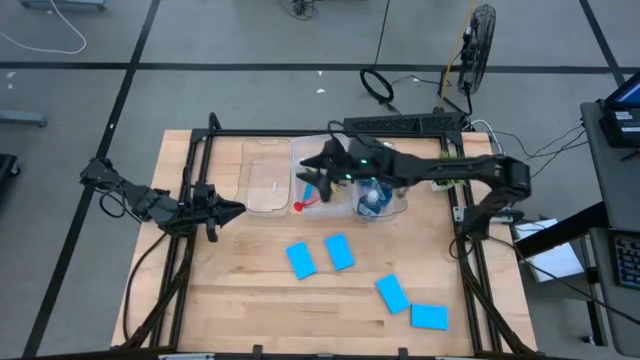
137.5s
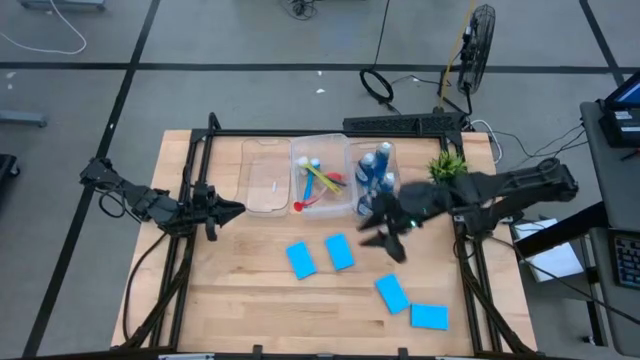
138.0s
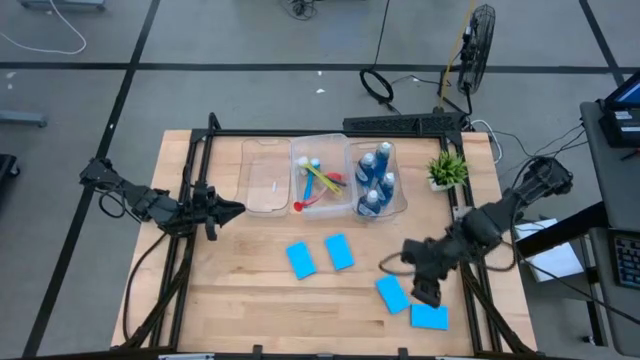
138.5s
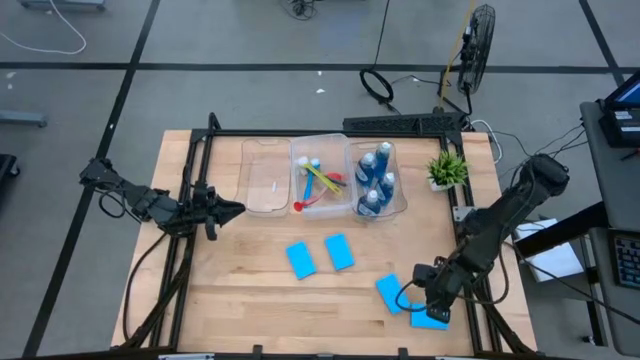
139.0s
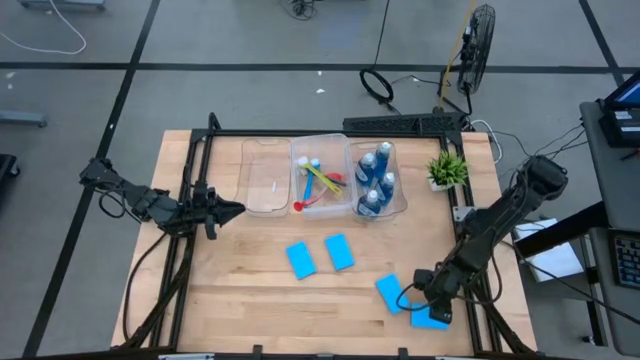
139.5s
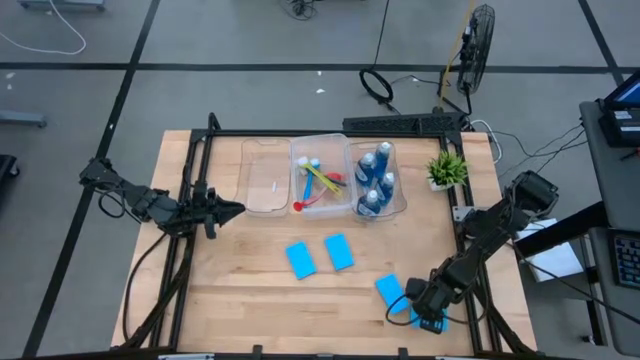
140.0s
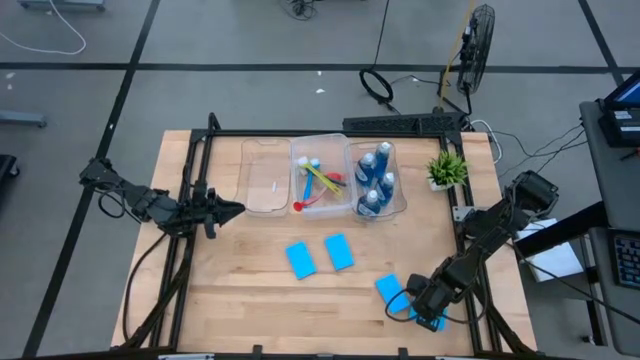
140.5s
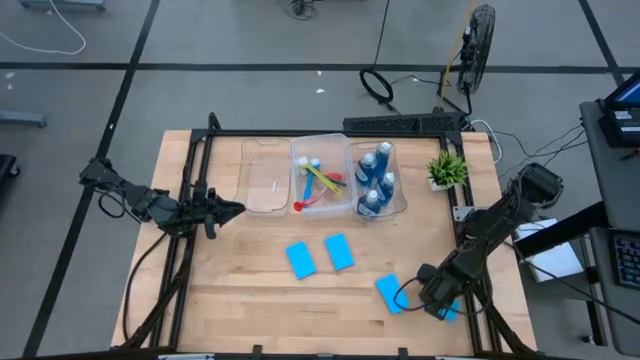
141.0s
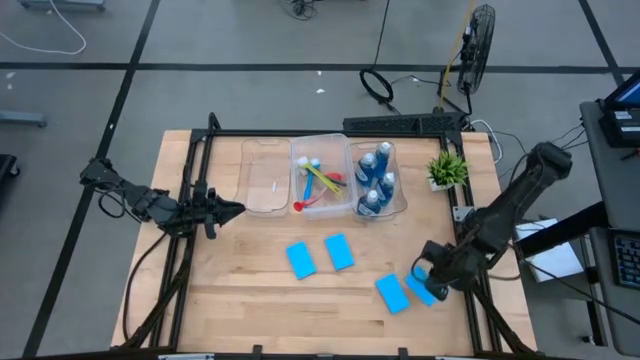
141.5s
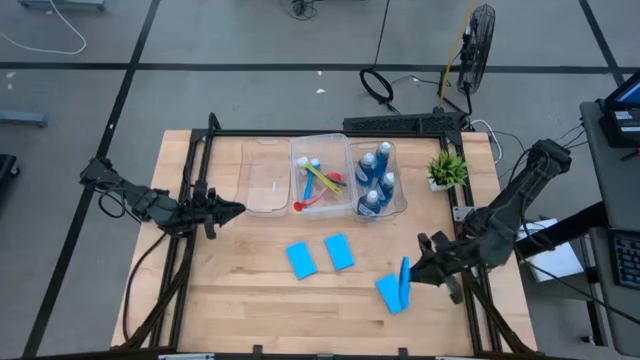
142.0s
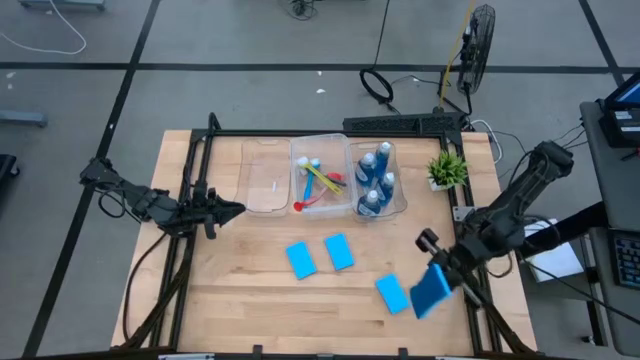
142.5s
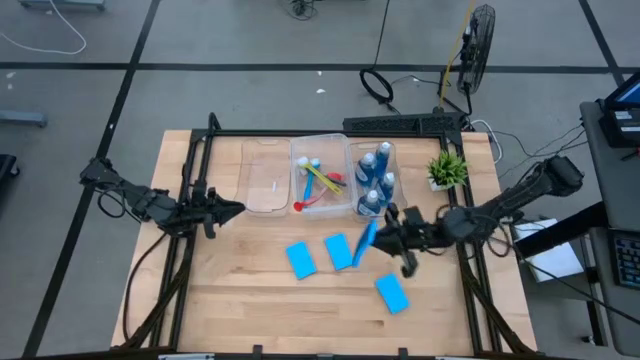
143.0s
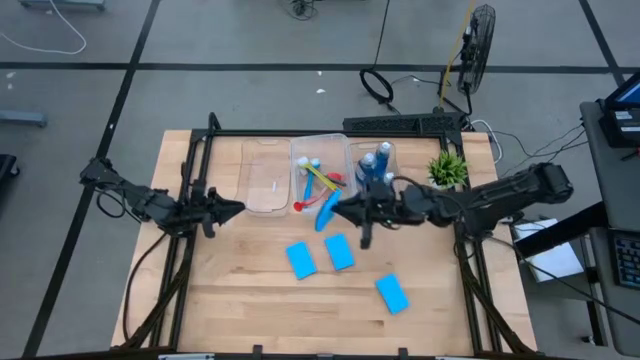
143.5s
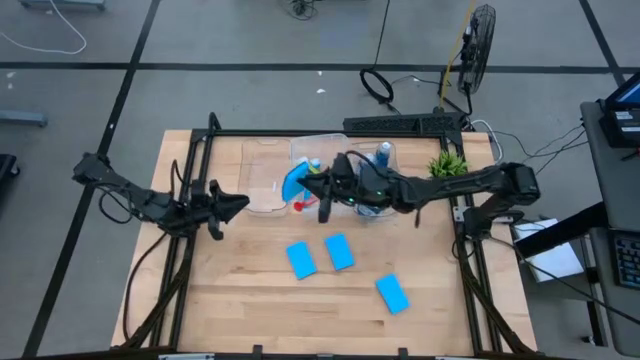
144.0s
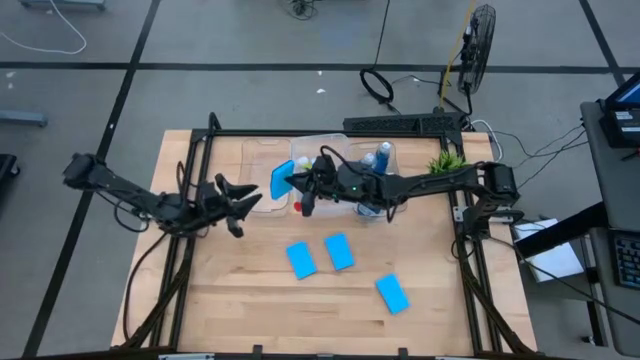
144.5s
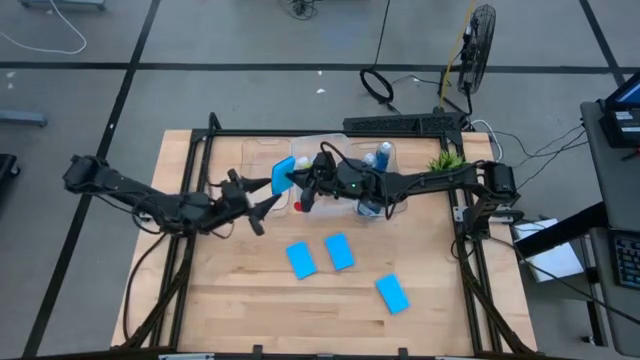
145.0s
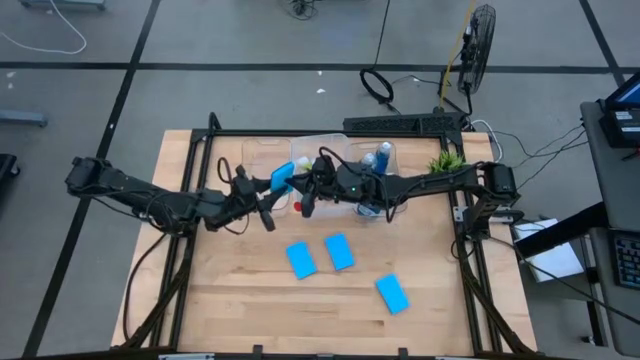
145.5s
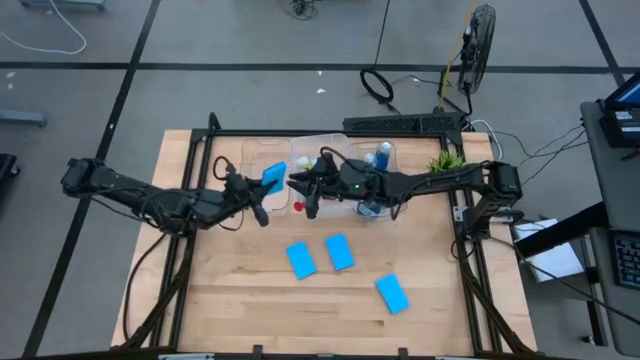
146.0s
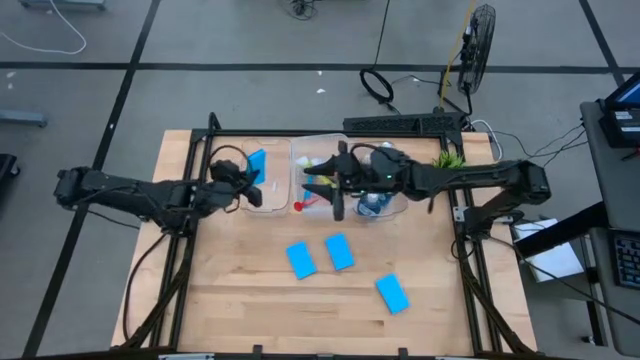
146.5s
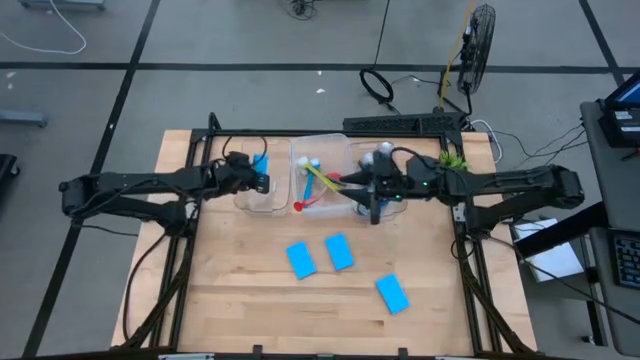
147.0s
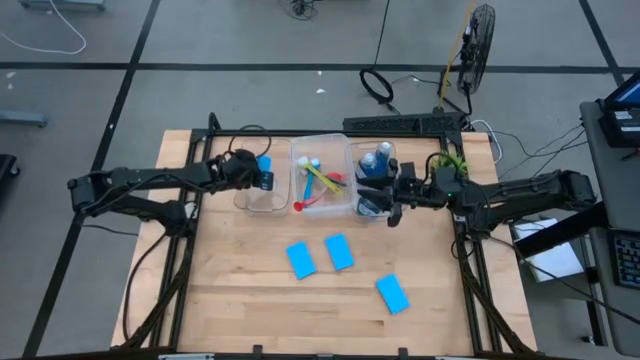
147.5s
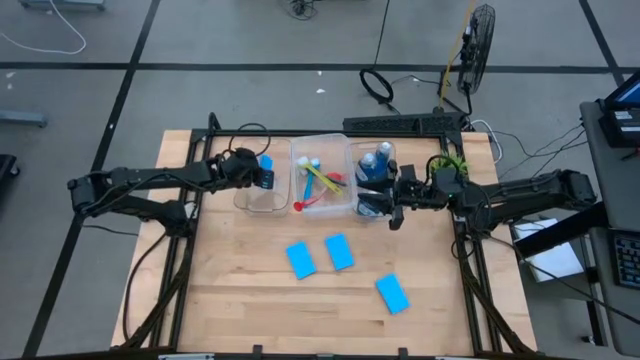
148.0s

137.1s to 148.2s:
Task: Pick & Place Kitchen Sink Supplies
Put the blue dishwashing sponge into the left transparent bin

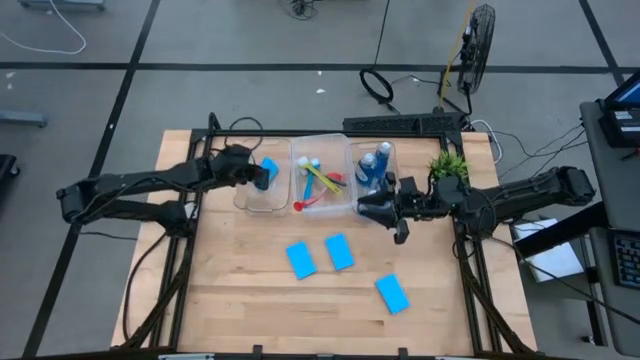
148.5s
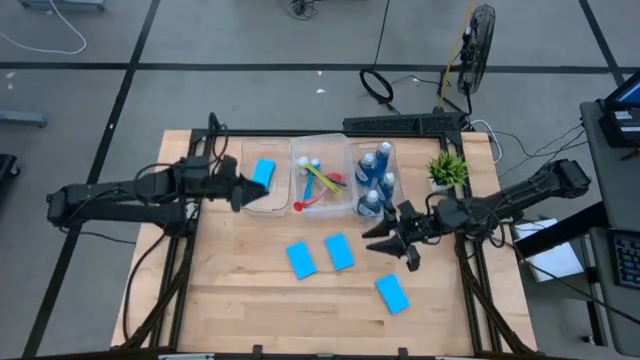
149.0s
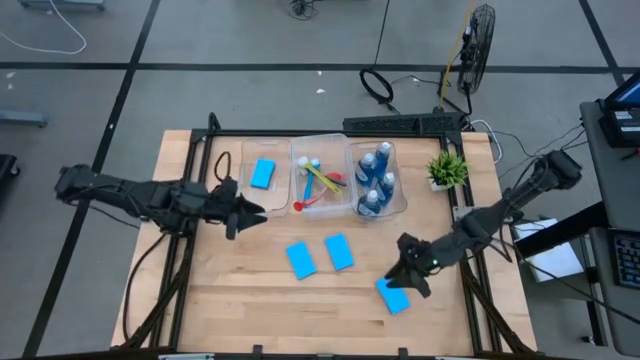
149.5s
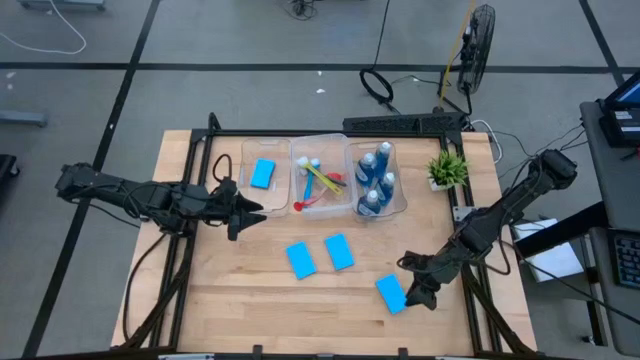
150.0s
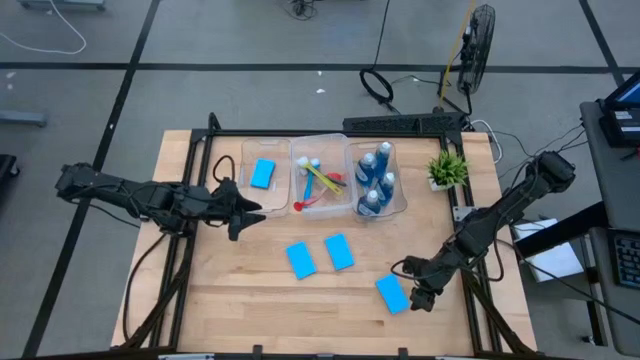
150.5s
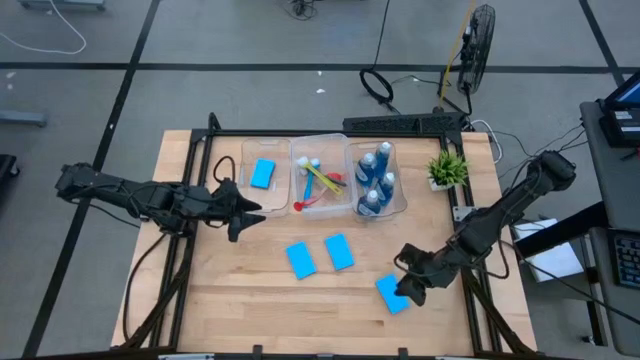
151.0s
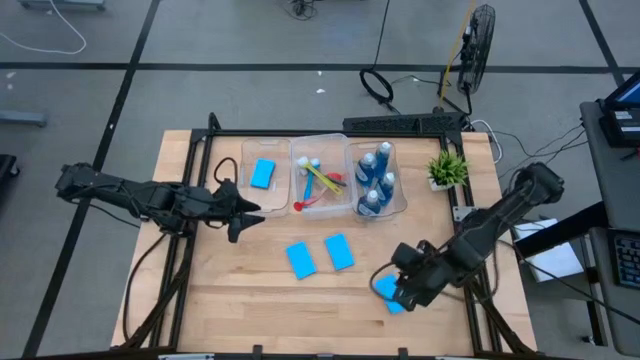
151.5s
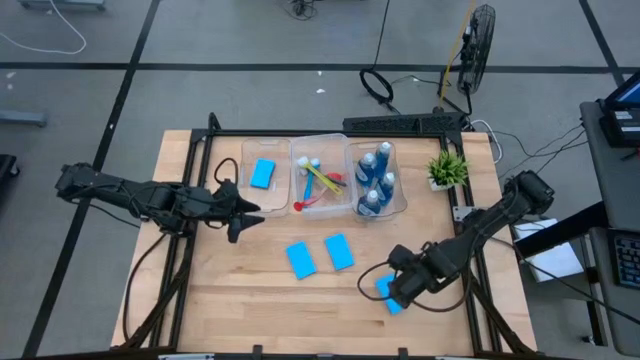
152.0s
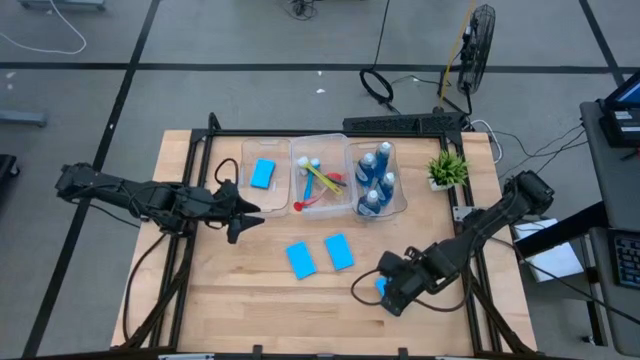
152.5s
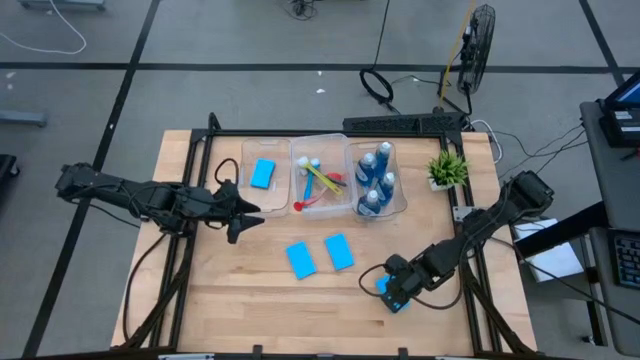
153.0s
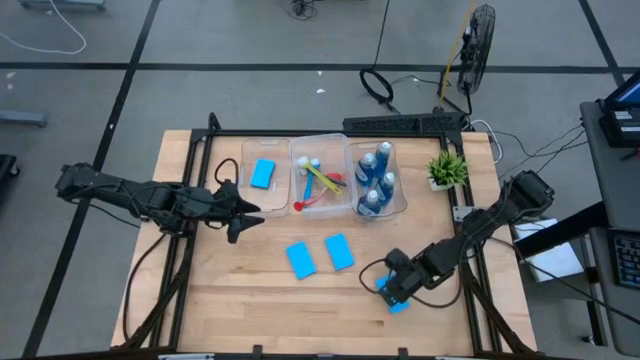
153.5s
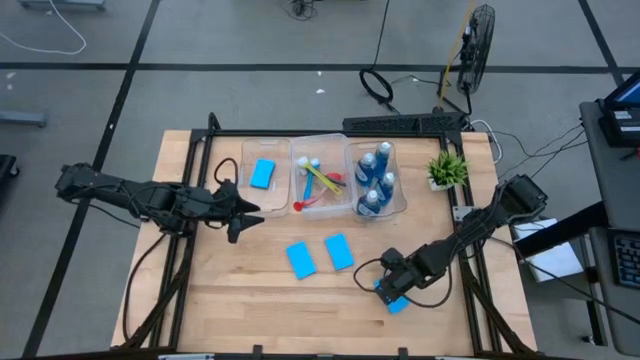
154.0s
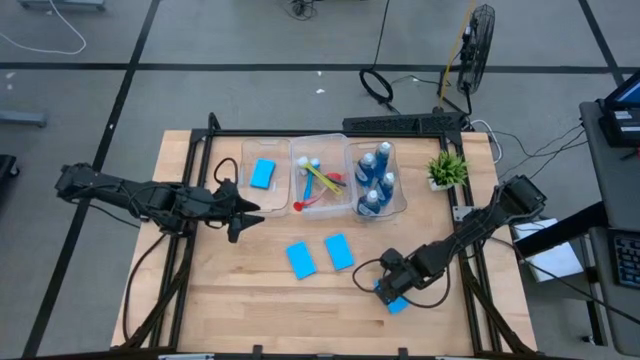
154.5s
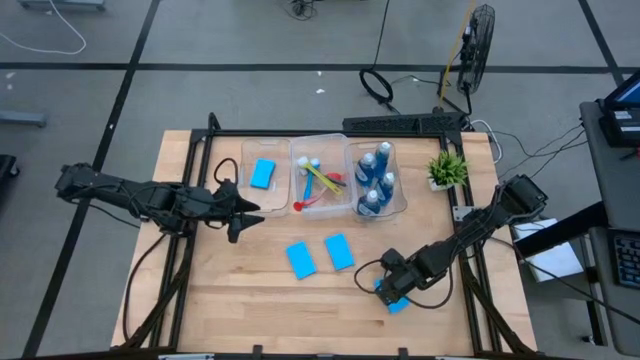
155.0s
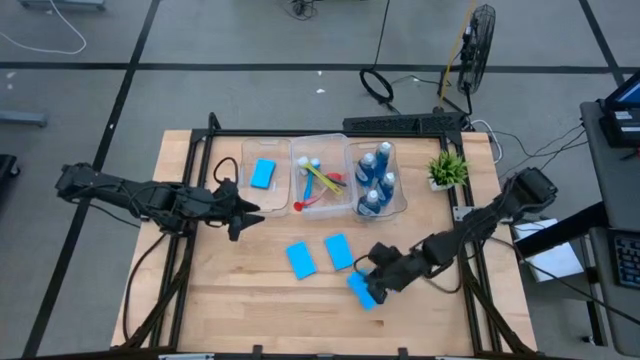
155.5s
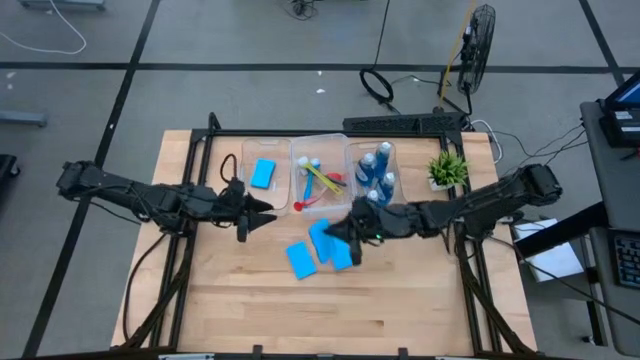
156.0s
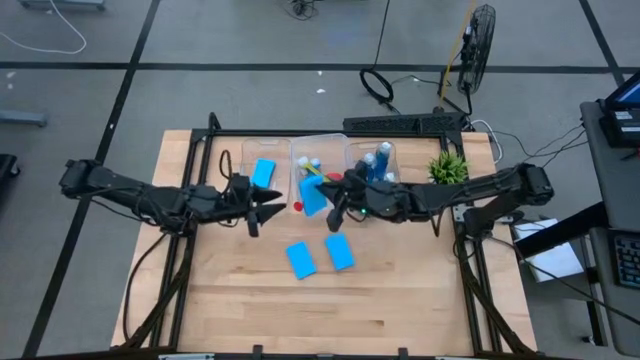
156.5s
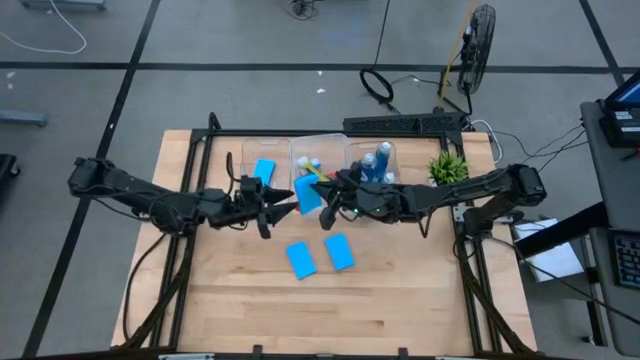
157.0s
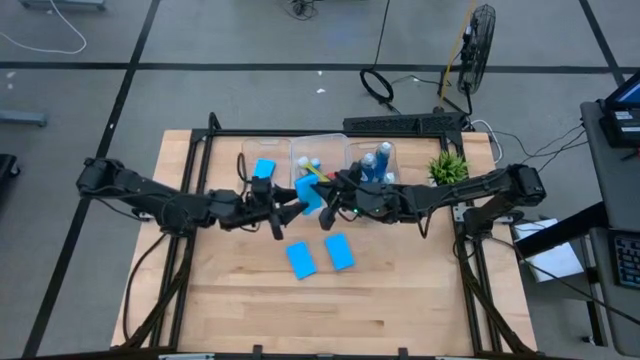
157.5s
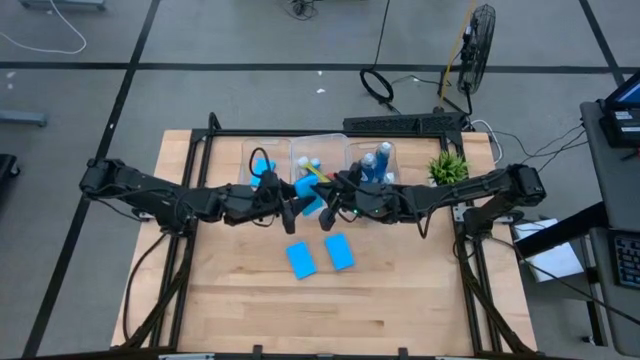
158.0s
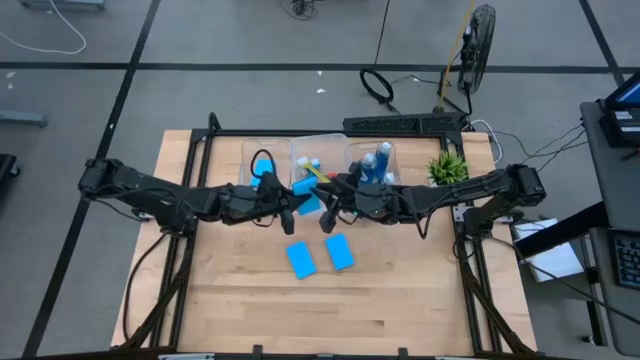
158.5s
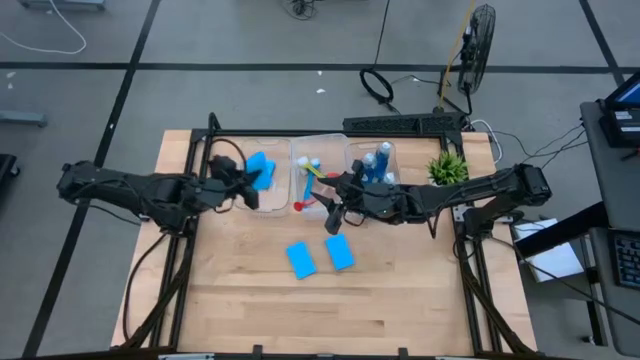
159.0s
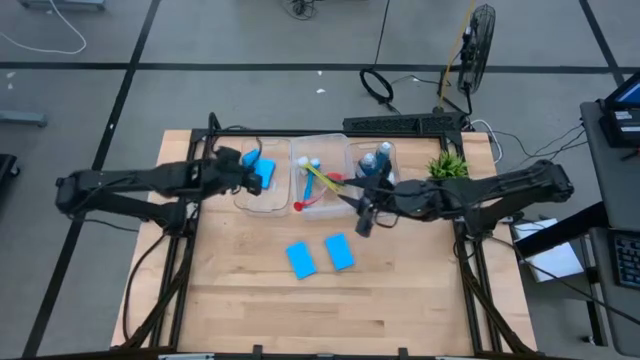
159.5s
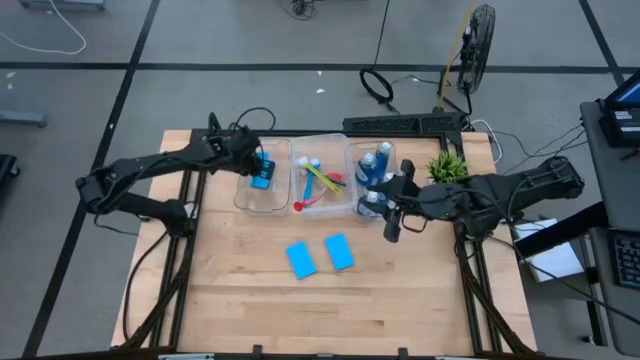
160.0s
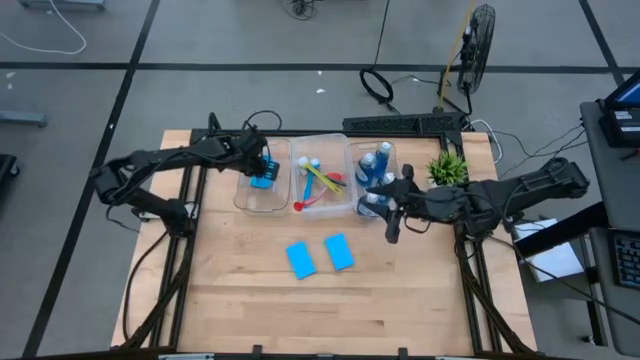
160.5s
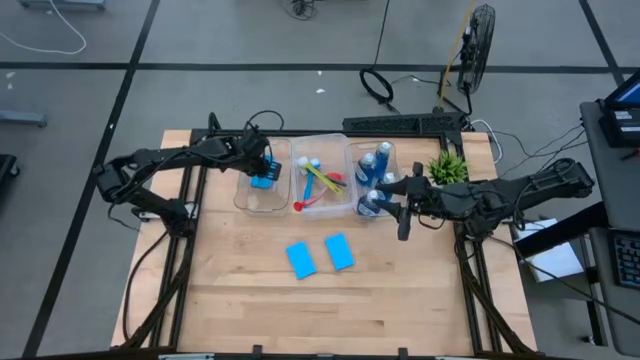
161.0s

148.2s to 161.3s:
Put the blue dishwashing sponge into the left transparent bin
